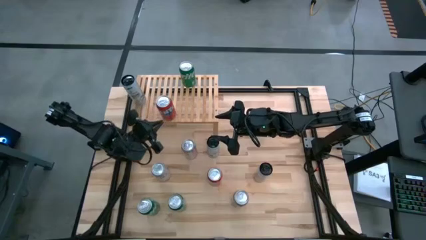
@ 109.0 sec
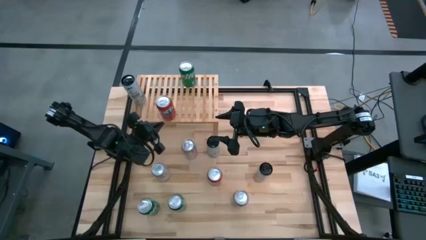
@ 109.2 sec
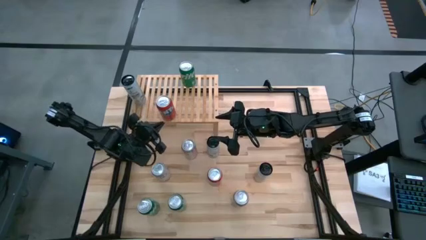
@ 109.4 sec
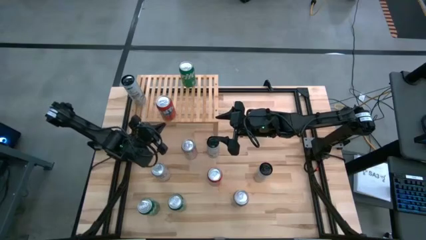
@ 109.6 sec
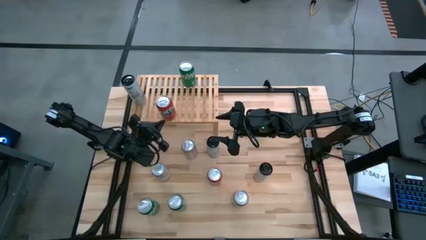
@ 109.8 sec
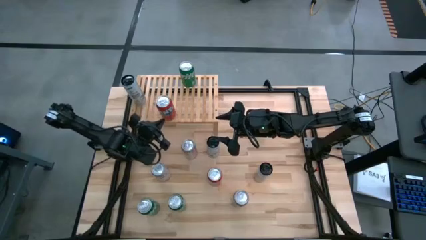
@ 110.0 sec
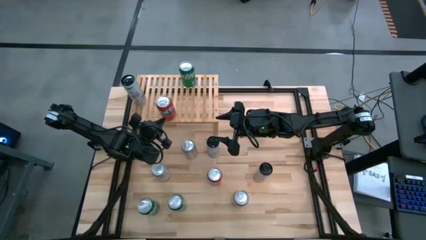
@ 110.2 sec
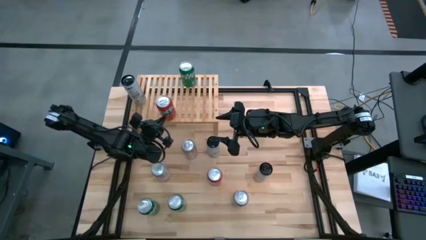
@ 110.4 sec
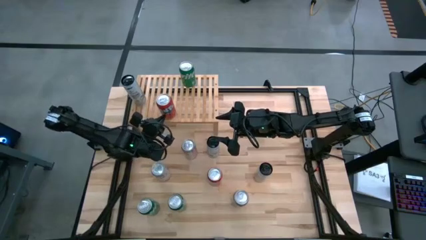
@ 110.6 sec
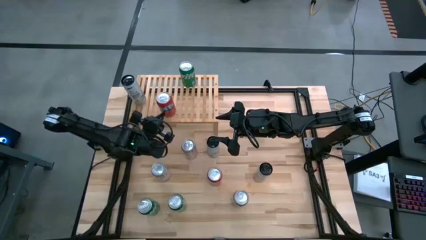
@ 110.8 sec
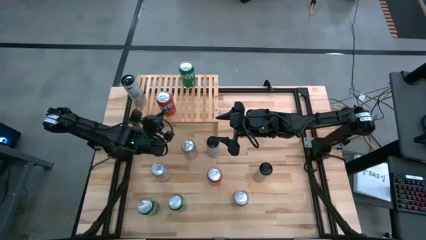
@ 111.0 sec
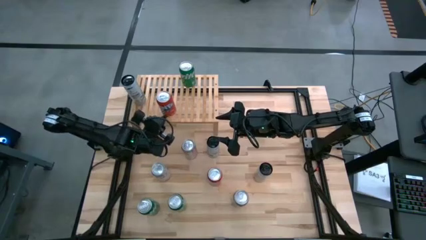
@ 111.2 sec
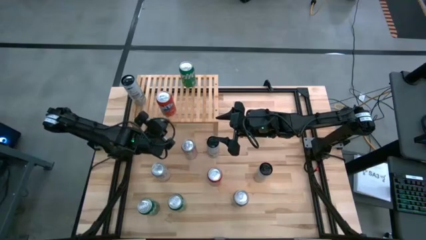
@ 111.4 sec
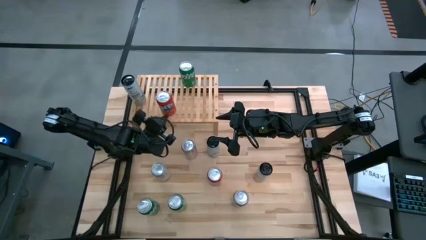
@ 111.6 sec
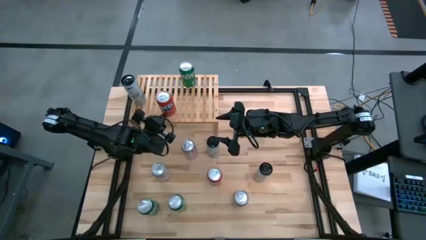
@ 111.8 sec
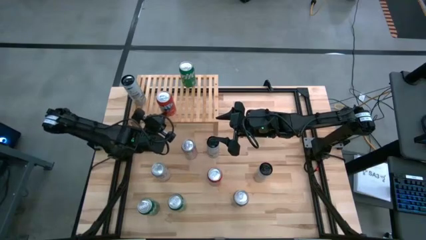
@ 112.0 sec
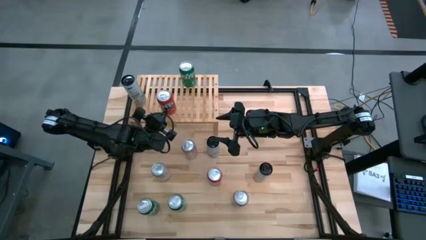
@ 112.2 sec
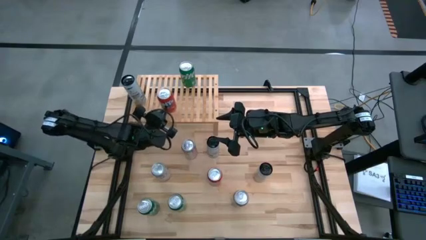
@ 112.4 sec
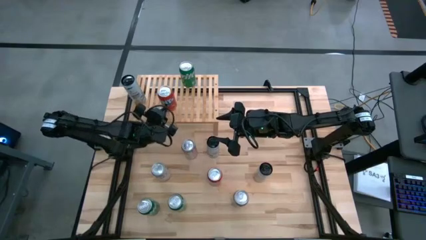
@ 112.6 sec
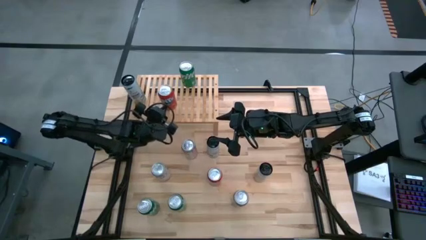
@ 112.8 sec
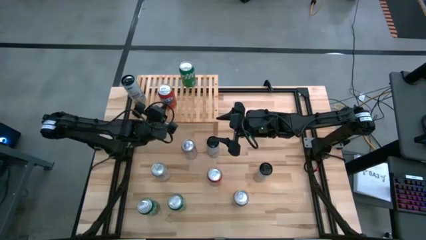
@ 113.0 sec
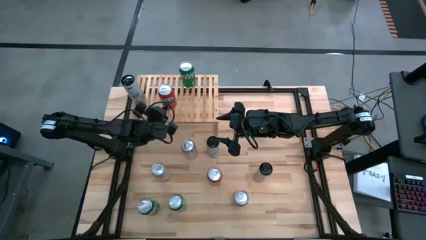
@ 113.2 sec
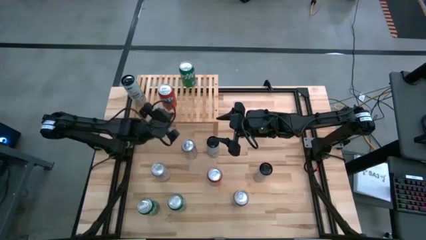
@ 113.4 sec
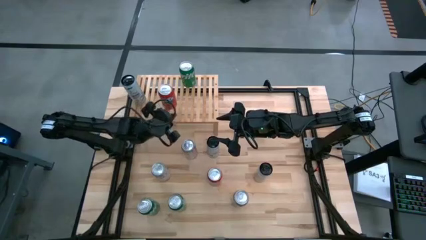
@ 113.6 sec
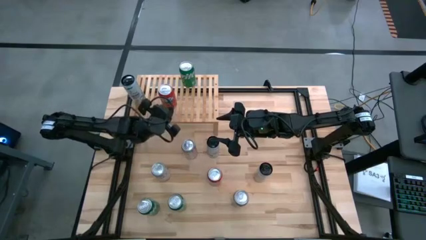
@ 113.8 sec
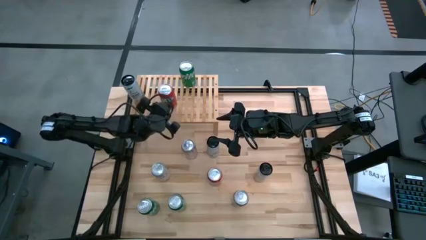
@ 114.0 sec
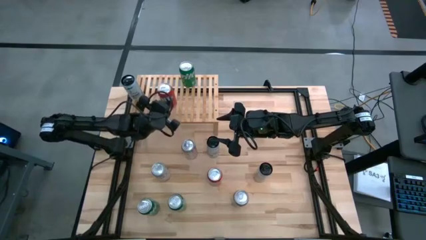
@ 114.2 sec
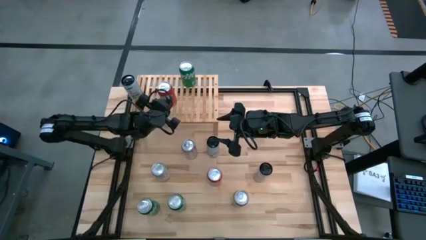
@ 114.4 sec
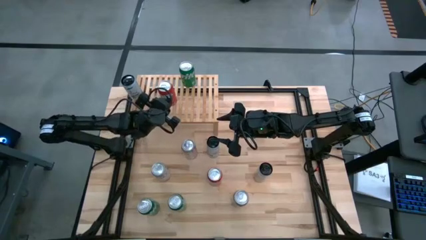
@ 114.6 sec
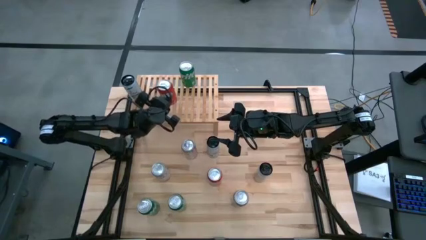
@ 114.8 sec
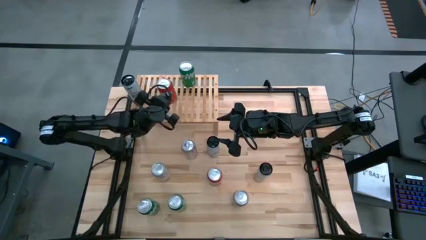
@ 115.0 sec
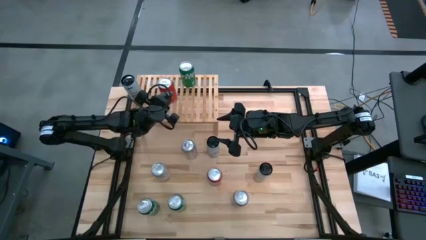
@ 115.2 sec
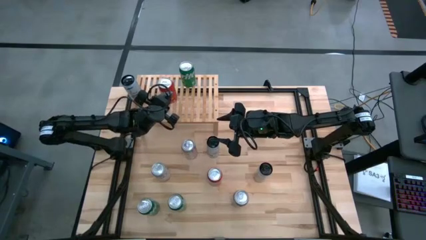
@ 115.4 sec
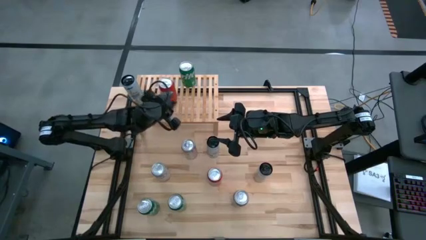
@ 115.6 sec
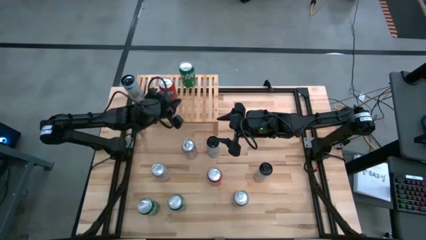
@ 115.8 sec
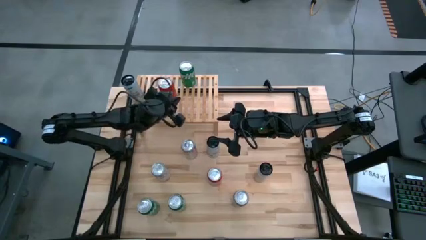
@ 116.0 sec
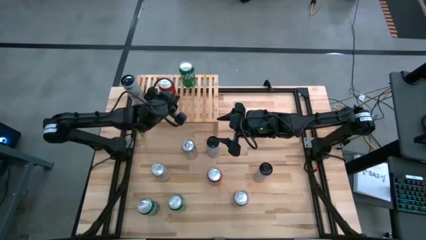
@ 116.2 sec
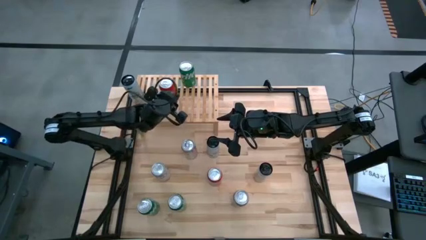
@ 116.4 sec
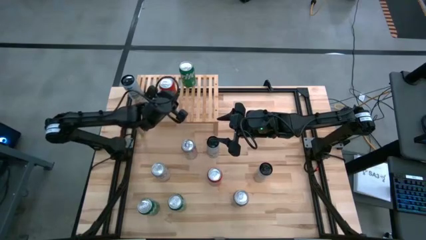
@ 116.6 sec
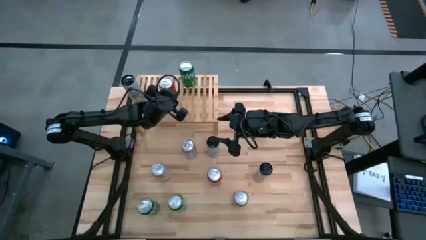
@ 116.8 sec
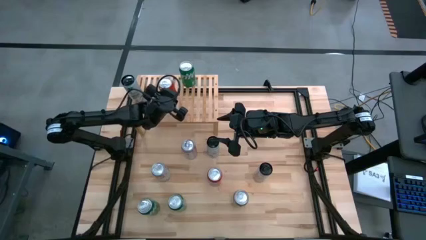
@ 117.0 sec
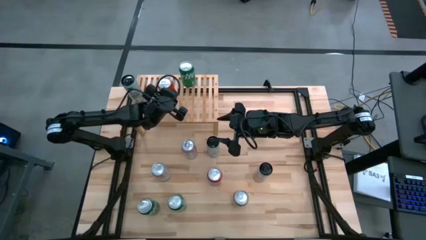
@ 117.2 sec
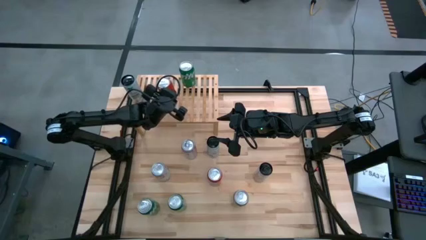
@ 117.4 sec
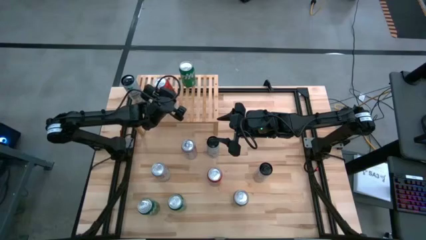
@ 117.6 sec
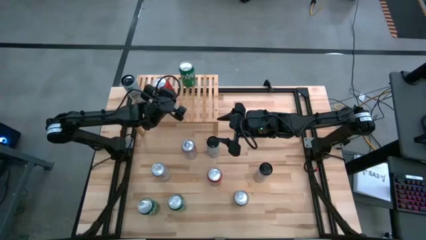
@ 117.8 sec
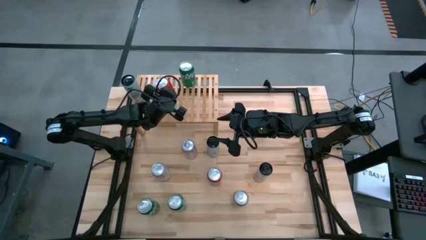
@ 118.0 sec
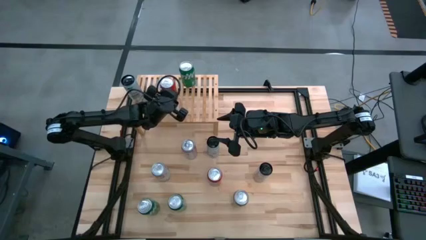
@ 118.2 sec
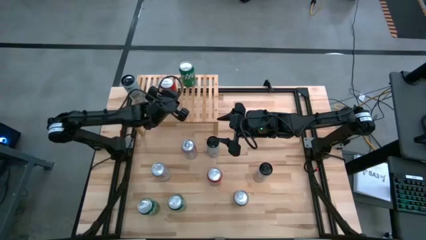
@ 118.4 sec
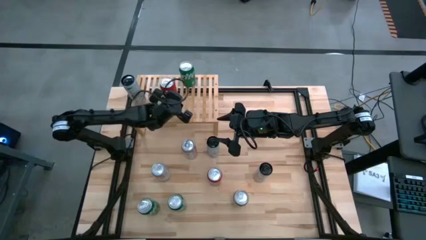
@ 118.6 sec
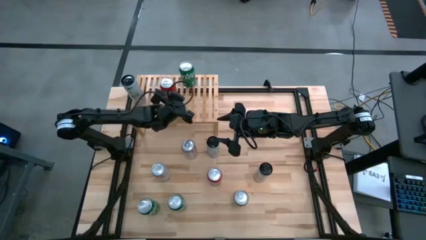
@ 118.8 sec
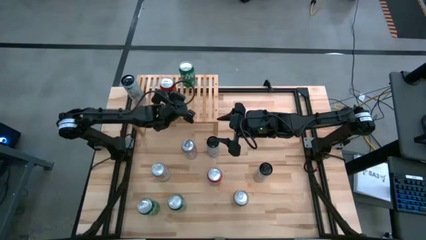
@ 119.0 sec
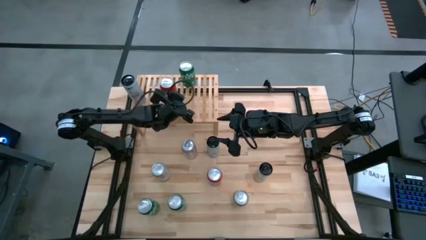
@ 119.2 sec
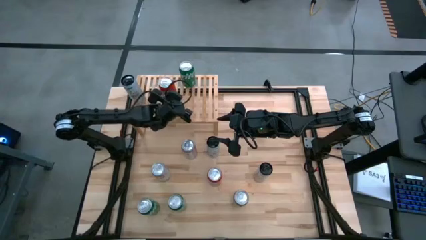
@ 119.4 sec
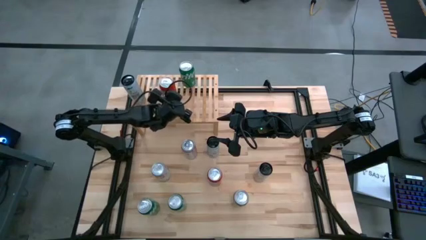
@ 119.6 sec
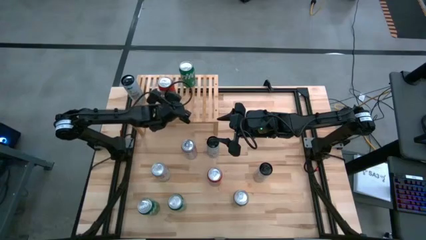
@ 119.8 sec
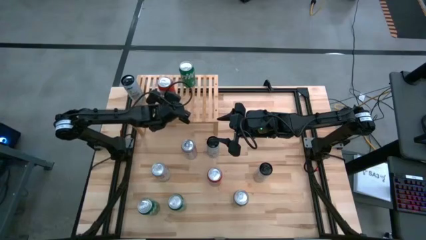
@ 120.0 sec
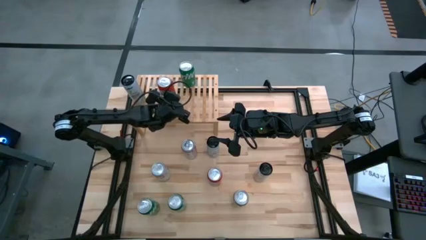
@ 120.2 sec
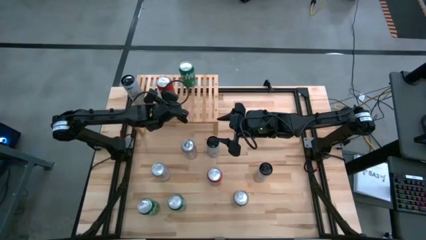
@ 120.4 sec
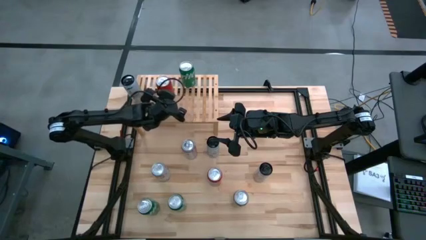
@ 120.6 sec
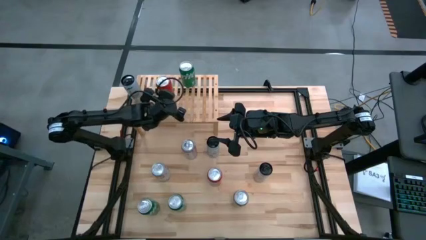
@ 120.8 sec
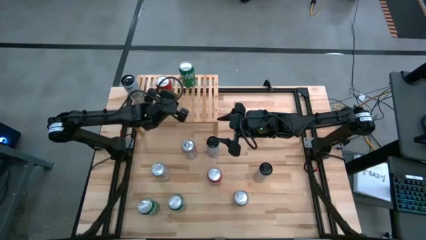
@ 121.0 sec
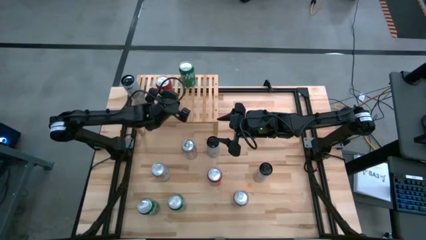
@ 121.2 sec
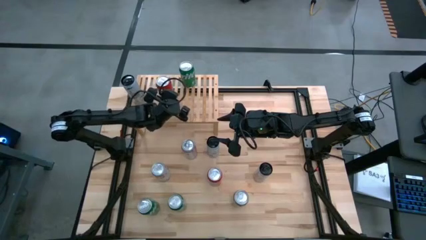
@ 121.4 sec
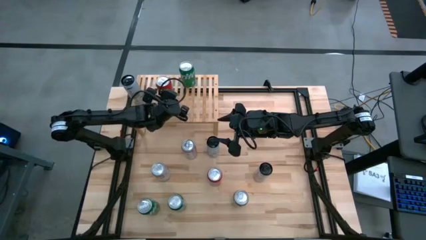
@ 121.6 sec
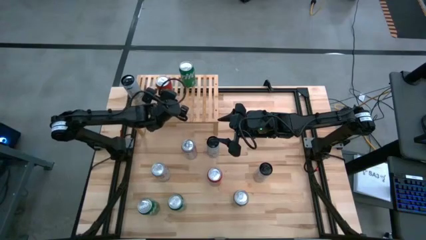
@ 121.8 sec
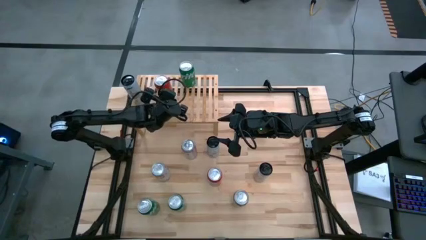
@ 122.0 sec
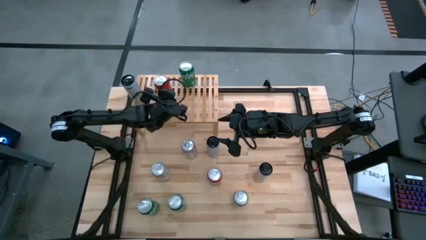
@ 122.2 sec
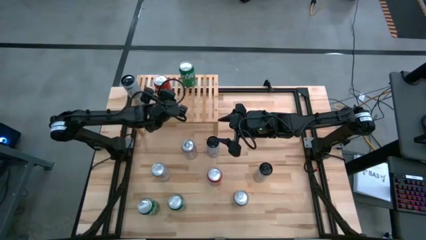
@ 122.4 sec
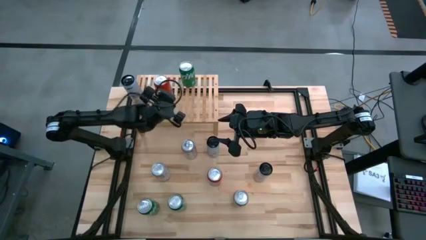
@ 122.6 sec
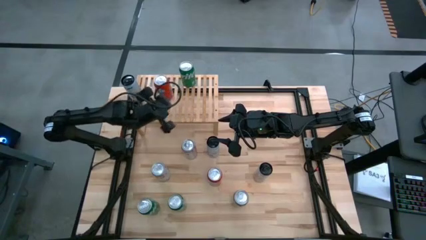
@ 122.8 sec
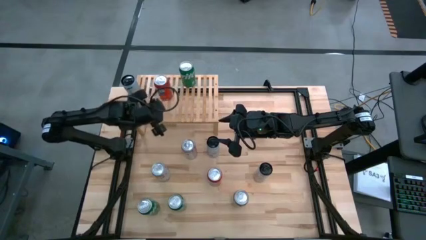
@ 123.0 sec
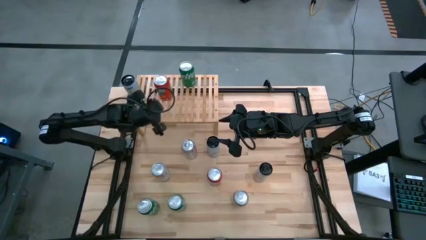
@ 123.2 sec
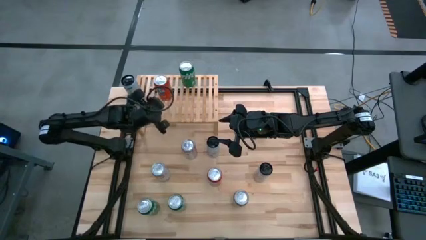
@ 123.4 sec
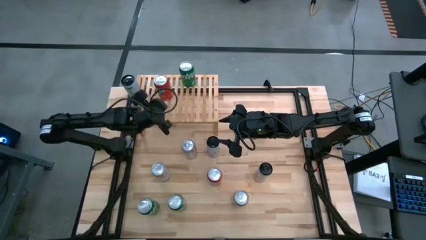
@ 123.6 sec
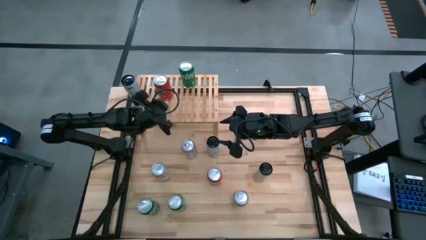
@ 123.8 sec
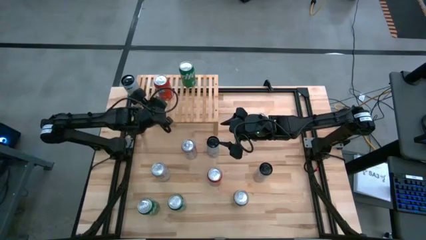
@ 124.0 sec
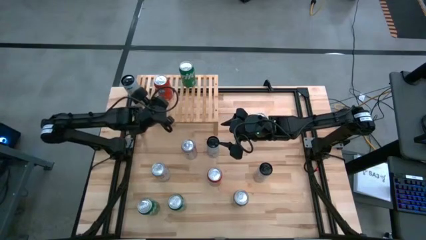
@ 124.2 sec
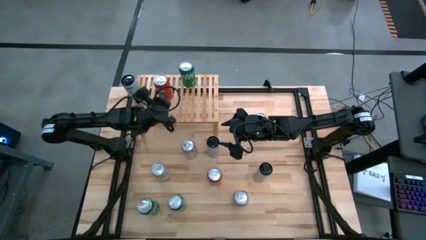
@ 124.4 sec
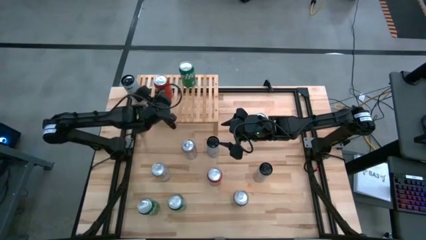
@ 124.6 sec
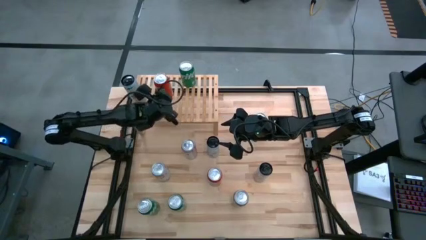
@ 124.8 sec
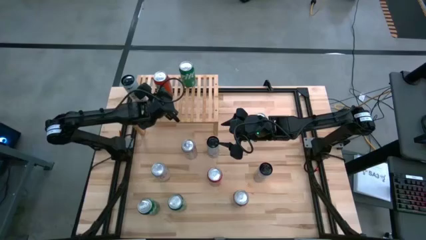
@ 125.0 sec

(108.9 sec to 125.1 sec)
Task: Place canned beverage on shelf
Put the middle orange soda can on the shelf
